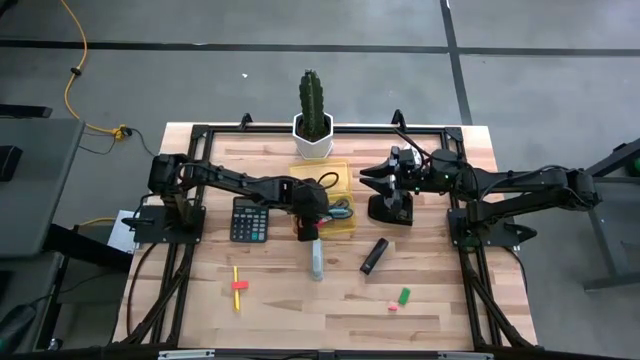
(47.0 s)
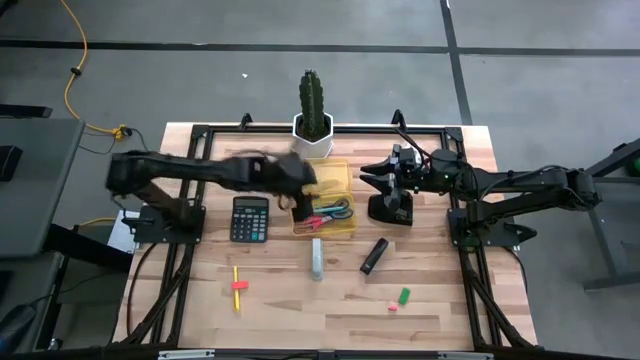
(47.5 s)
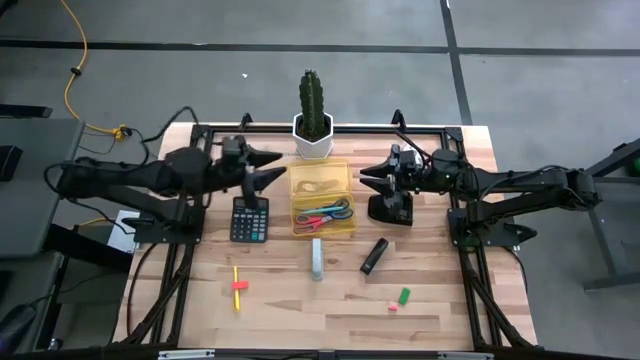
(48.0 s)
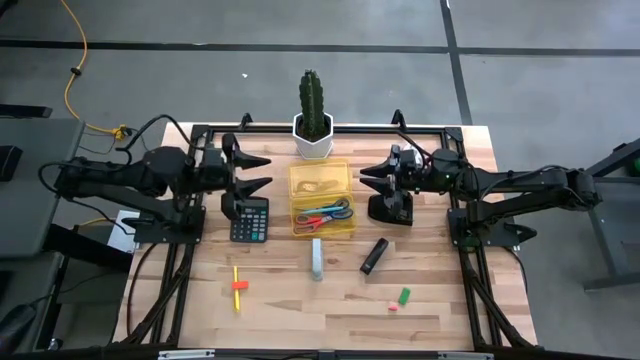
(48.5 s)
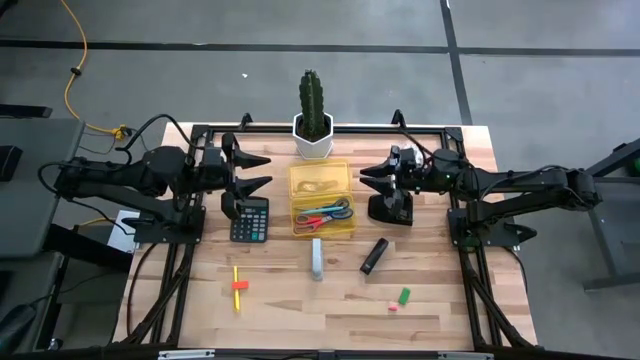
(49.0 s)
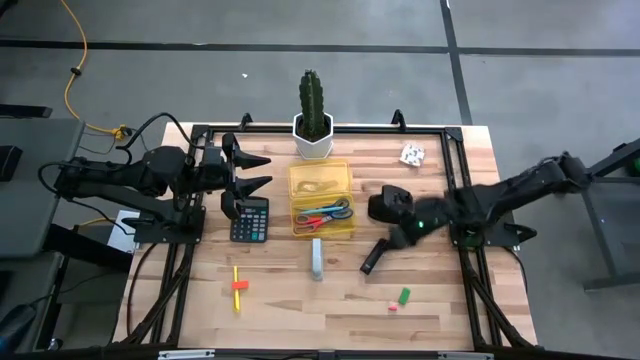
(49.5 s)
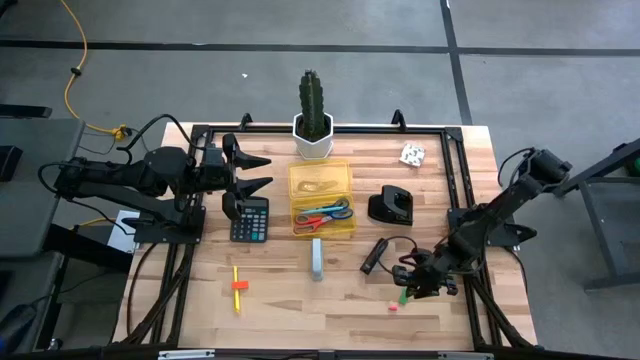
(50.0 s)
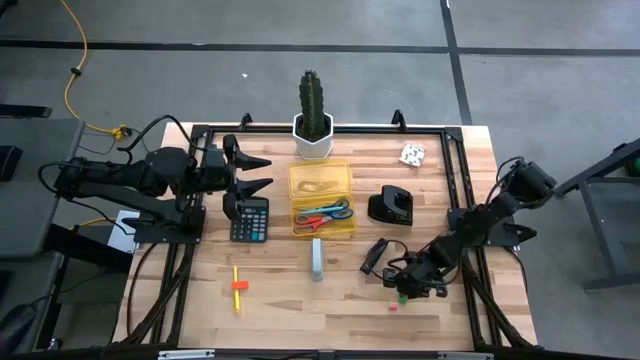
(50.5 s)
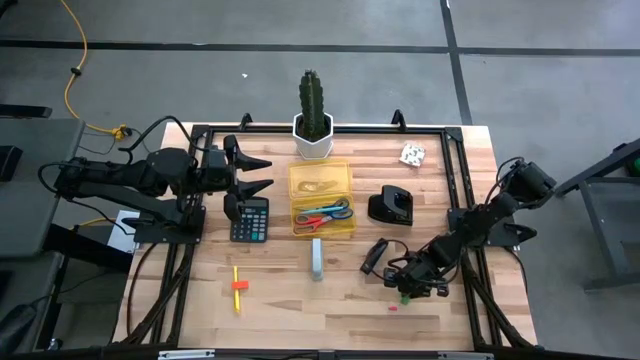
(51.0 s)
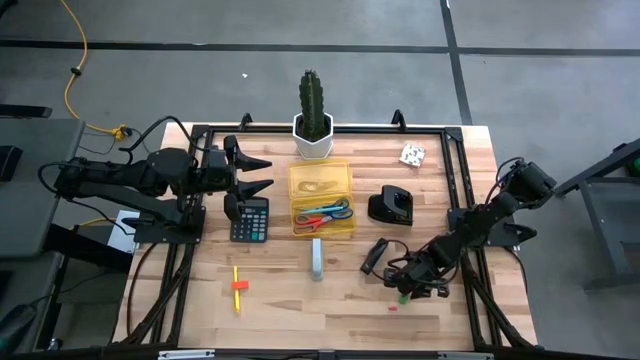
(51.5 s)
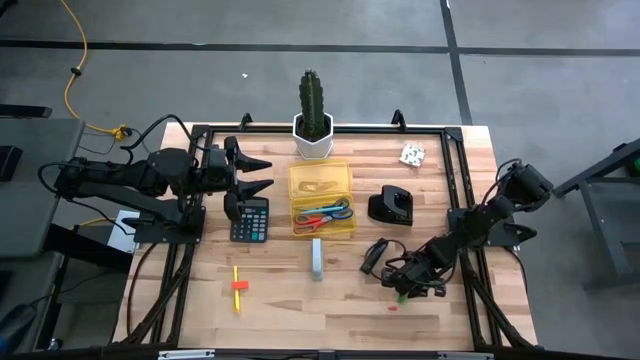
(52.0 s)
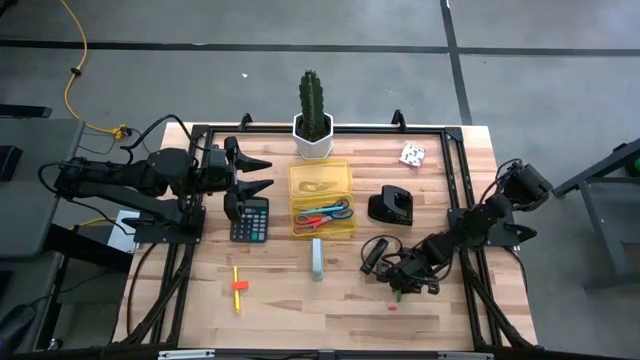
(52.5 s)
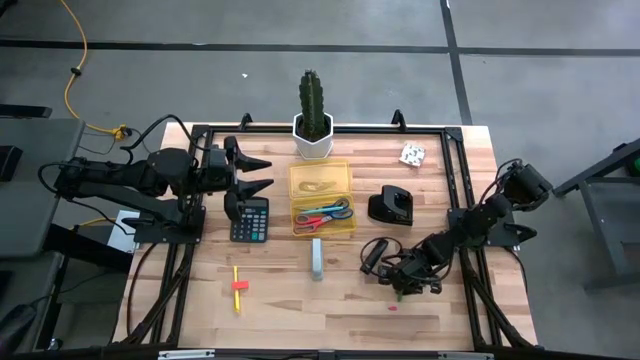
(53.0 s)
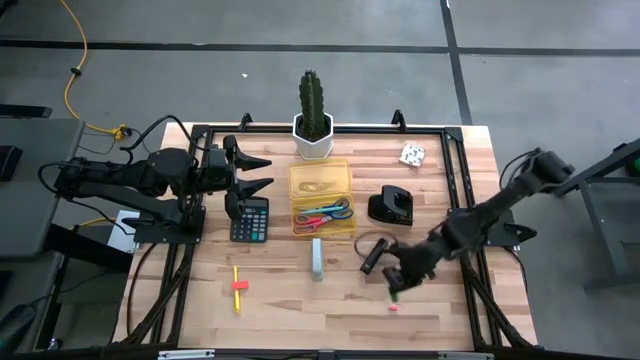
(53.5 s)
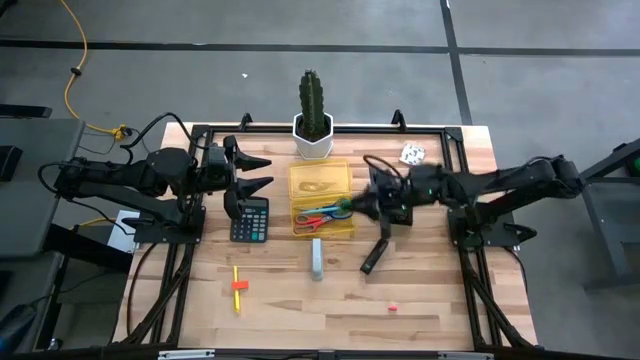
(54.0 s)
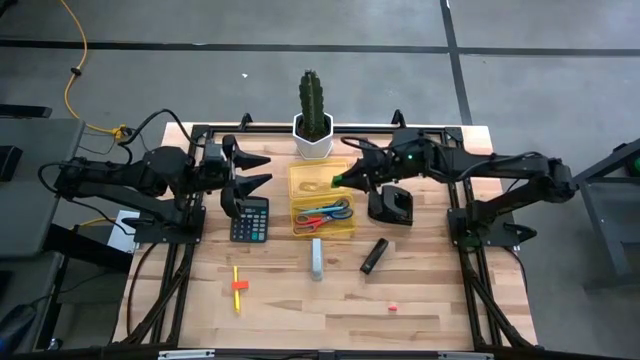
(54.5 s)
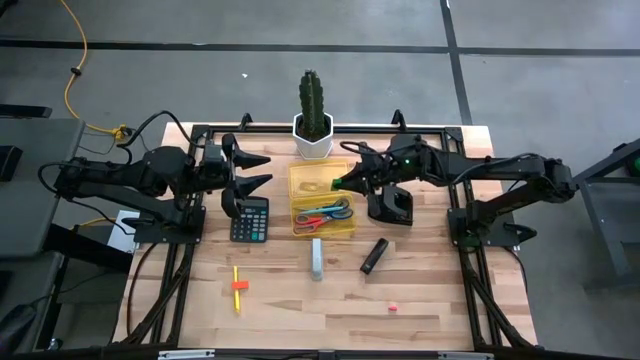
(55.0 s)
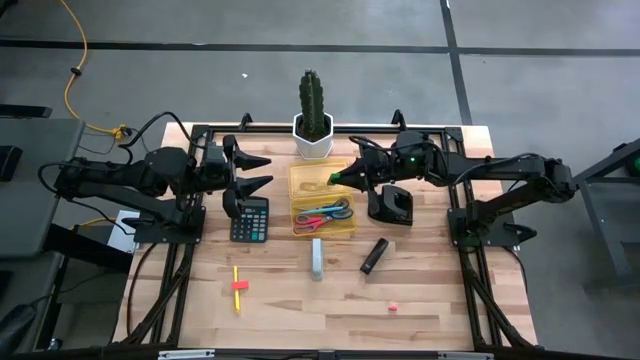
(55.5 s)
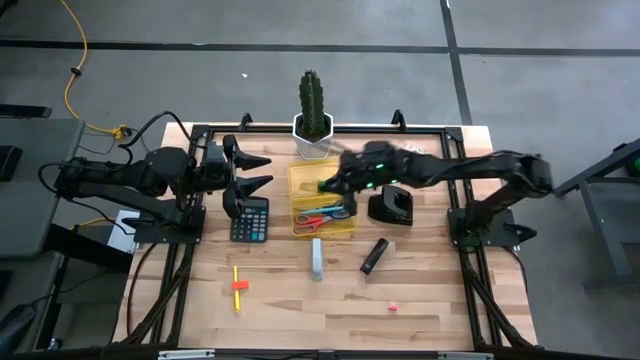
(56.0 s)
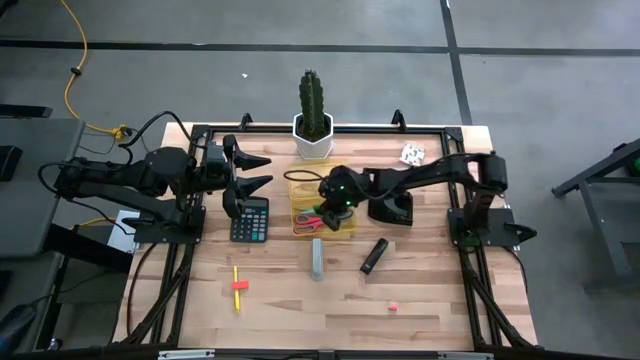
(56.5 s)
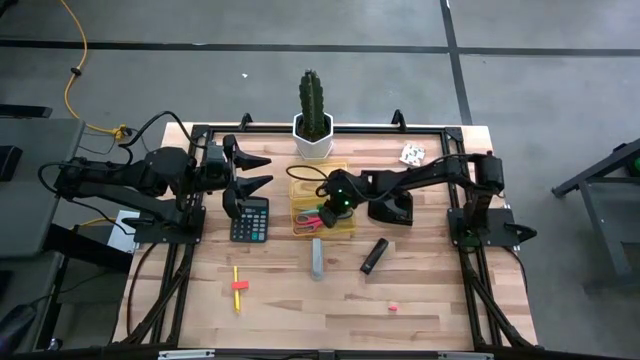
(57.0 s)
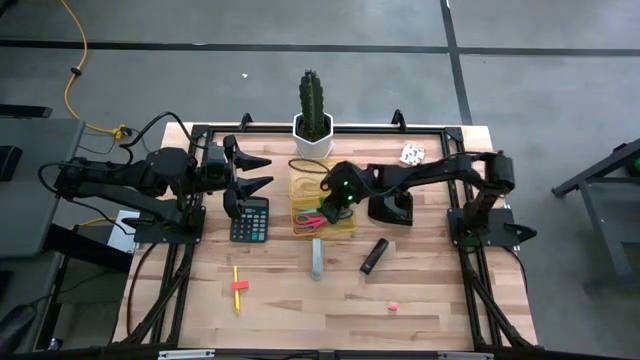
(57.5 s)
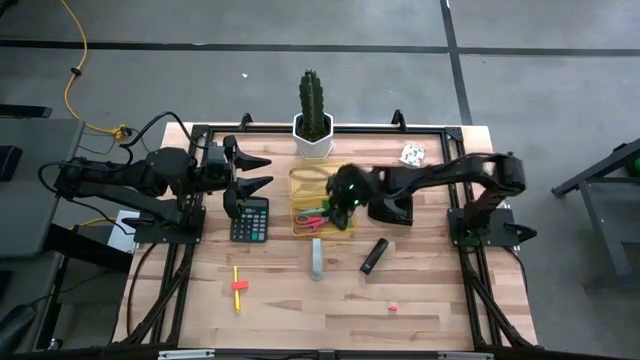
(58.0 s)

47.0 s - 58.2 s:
Task: Pick & place school supplies into a supply box
Put the green eraser into the yellow supply box

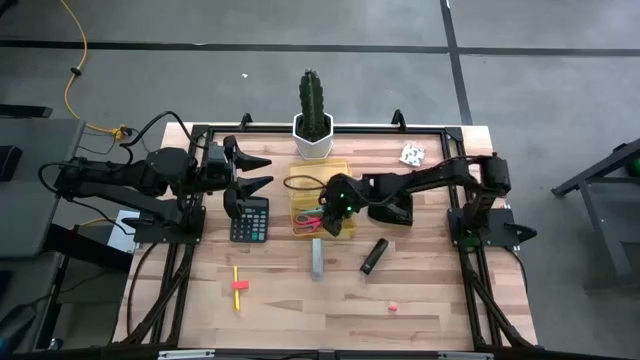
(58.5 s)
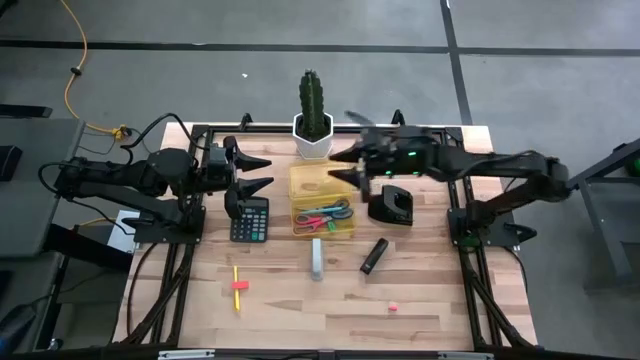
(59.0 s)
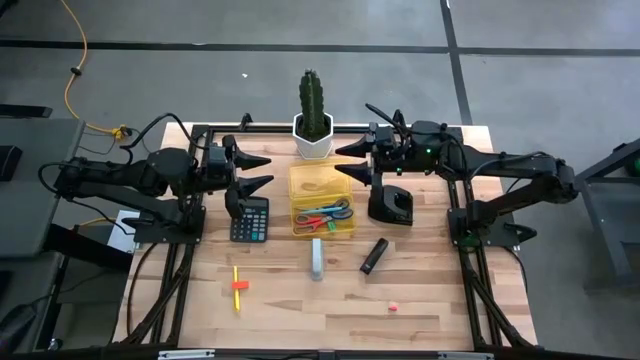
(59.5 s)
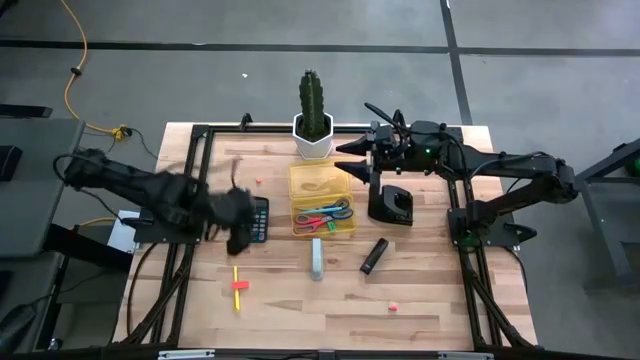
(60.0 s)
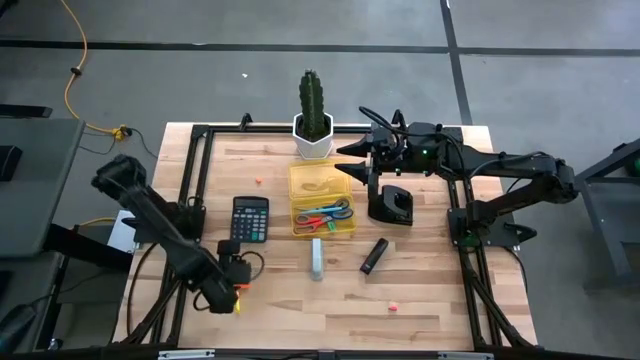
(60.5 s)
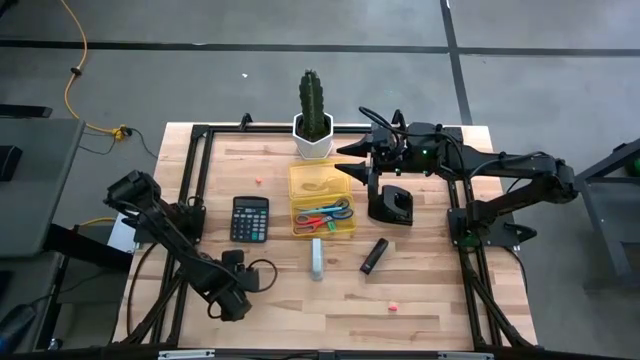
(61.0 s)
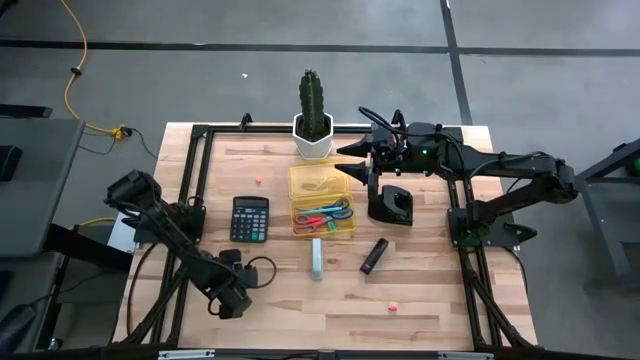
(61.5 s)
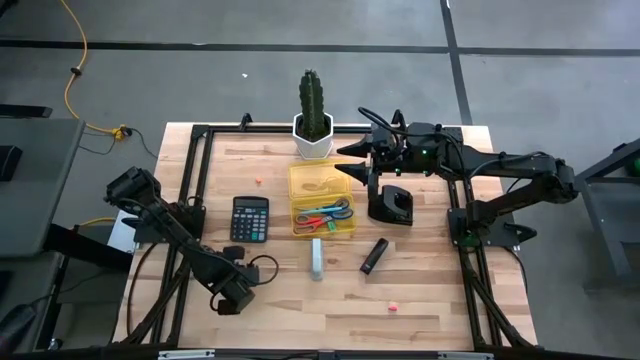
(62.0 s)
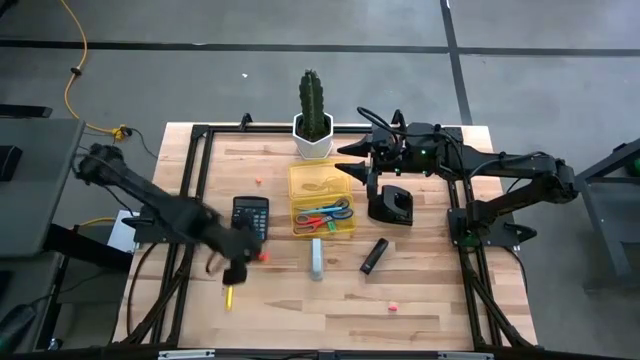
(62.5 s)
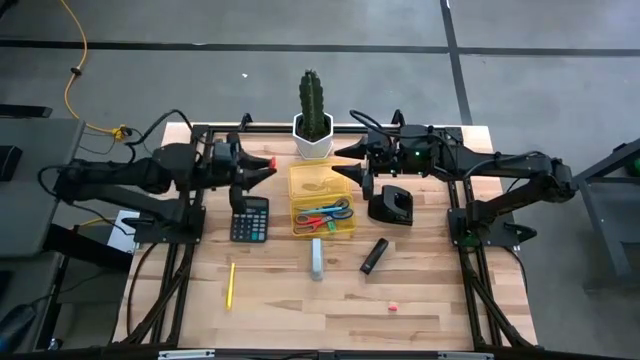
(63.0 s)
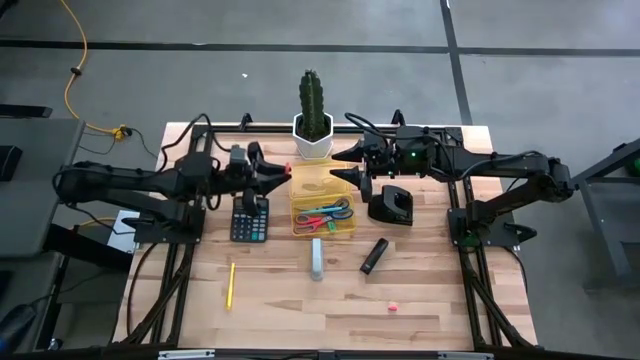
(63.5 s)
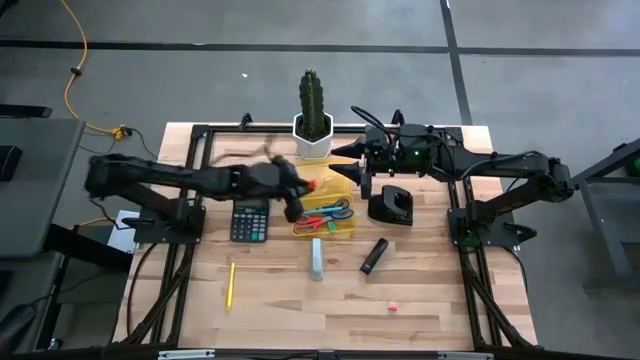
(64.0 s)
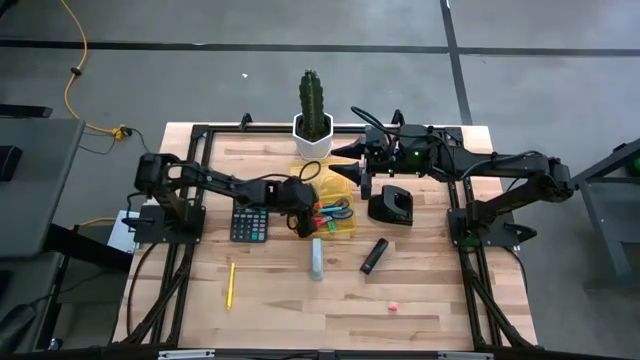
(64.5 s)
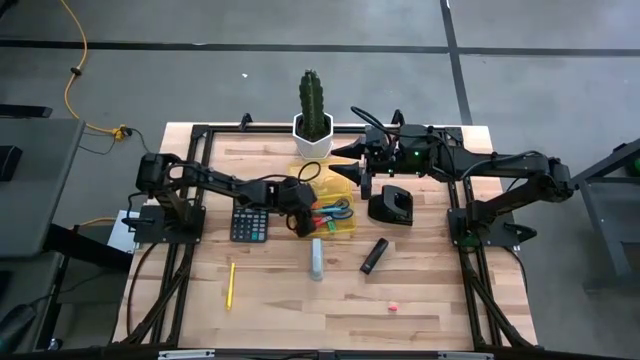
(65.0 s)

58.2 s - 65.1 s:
Put the bottom orange eraser into the yellow supply box

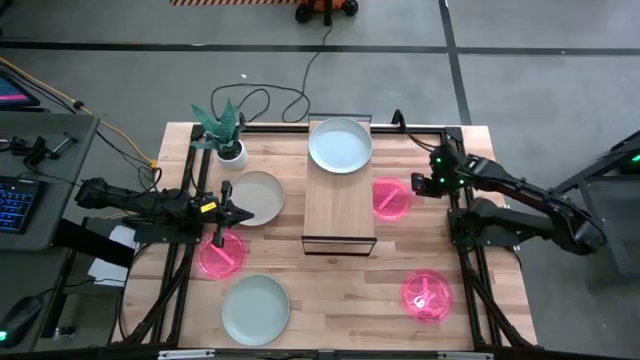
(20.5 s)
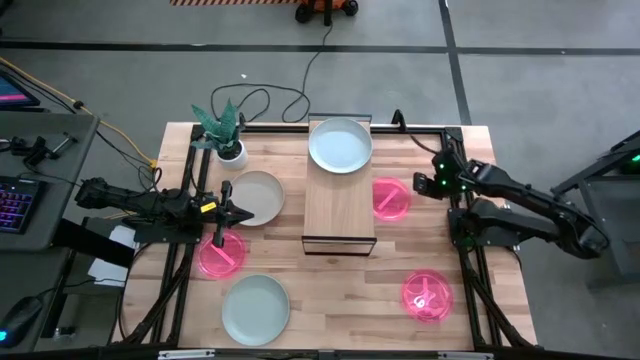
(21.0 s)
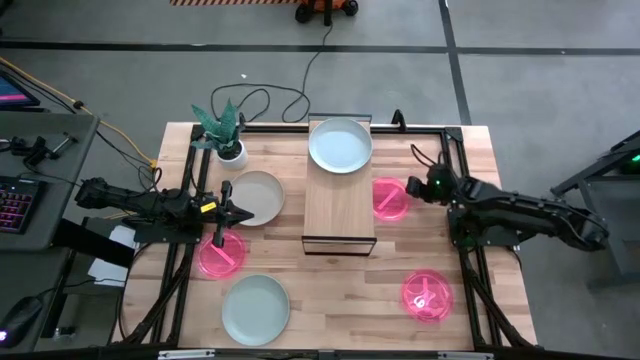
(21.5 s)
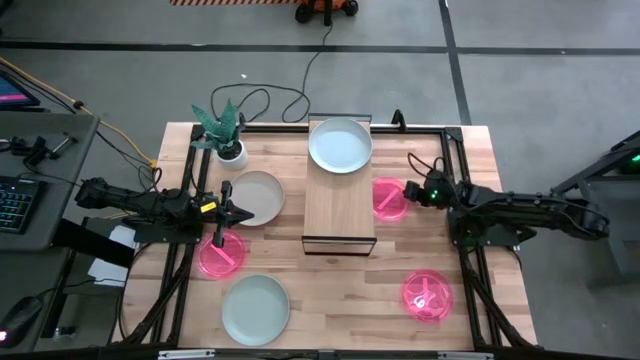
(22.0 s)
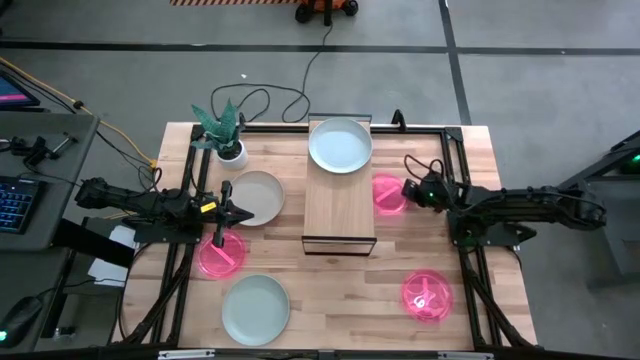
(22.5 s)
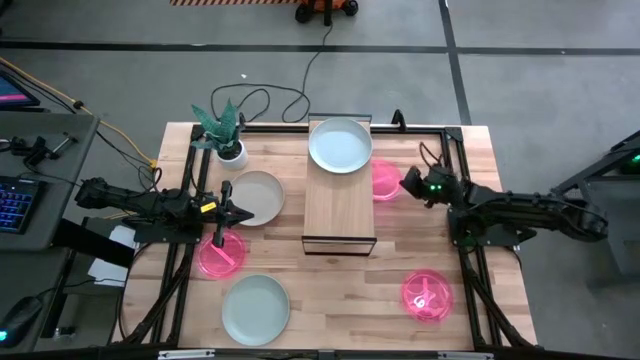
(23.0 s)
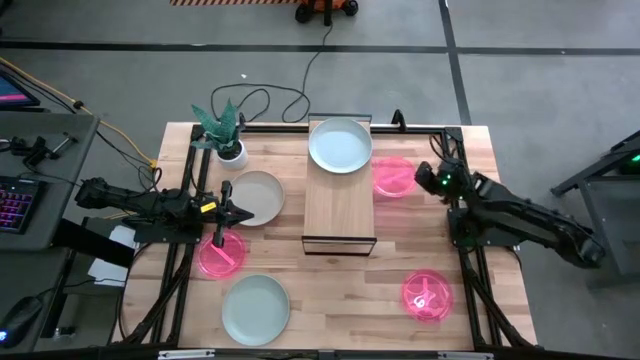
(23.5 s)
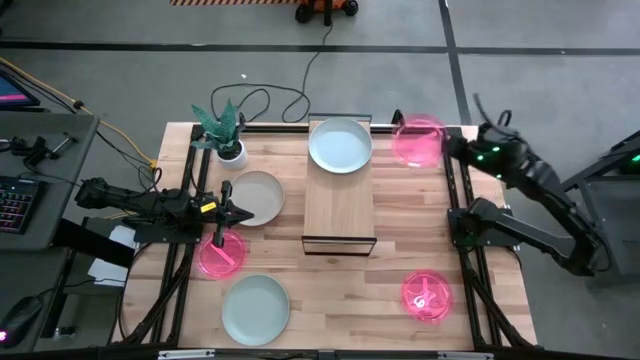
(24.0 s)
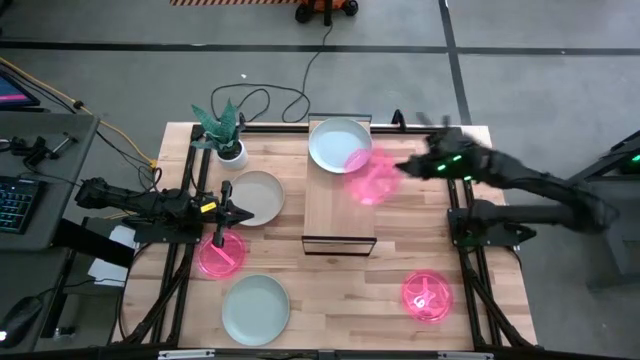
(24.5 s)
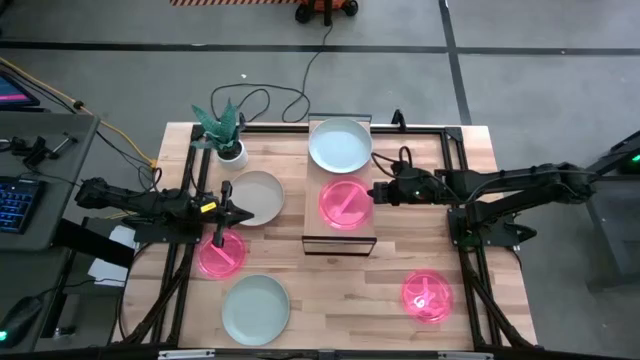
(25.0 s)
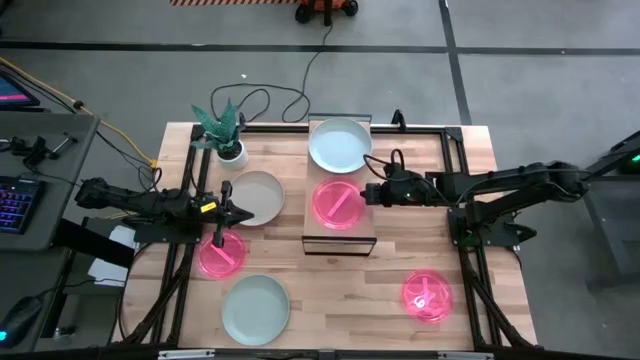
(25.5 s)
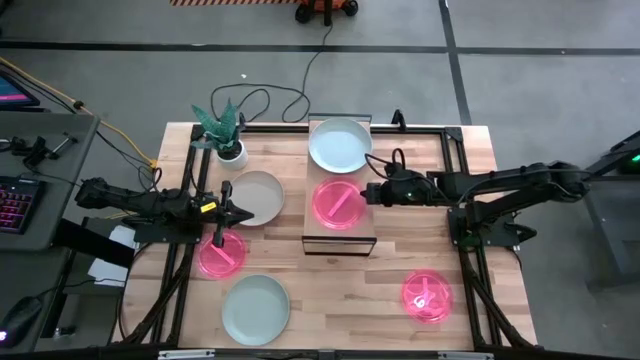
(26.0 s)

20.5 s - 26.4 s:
Task: Place and stack plates onto a shelf
Put the top pink plate on the shelf
